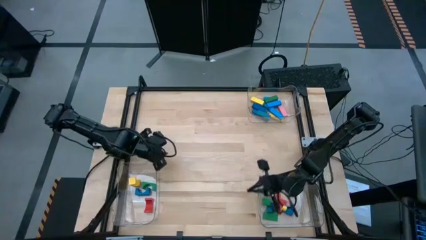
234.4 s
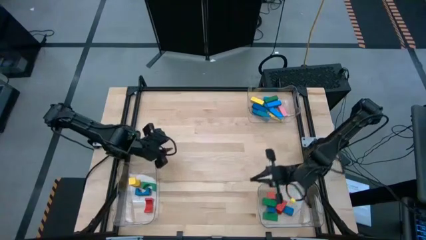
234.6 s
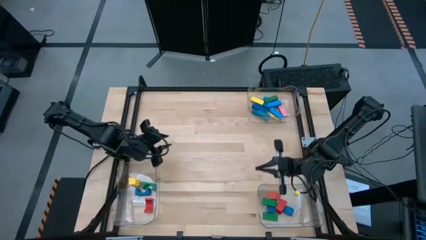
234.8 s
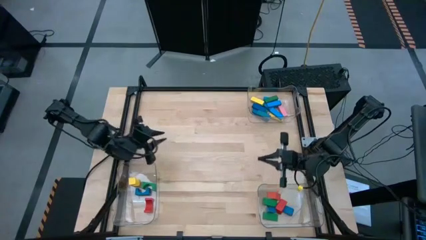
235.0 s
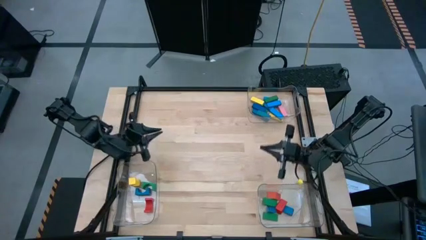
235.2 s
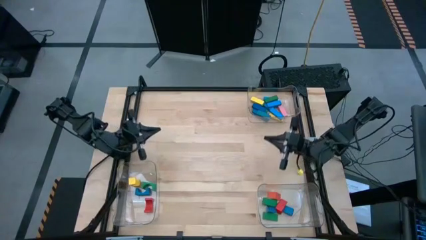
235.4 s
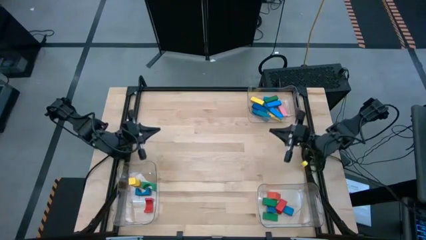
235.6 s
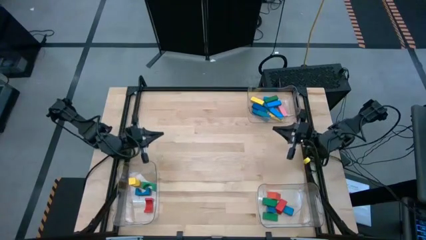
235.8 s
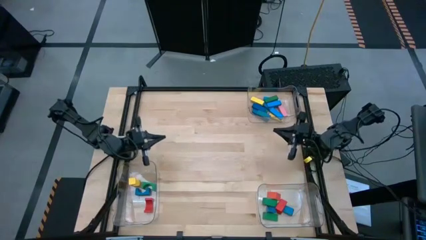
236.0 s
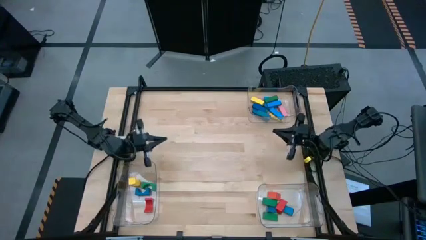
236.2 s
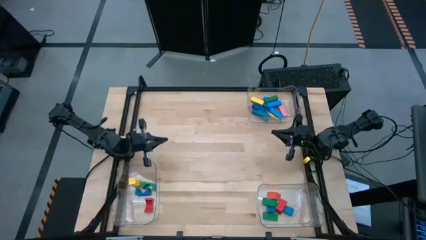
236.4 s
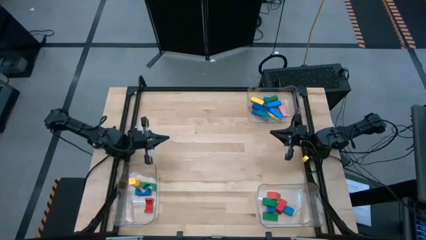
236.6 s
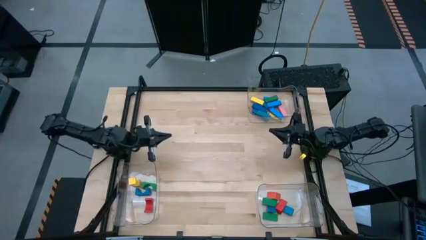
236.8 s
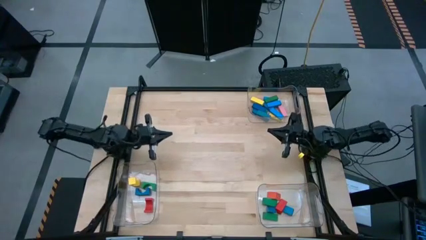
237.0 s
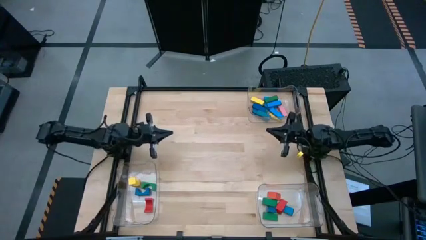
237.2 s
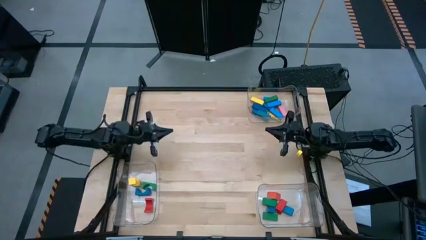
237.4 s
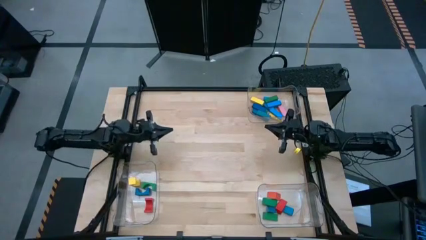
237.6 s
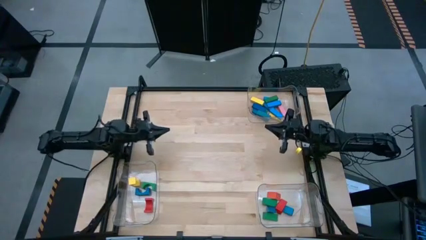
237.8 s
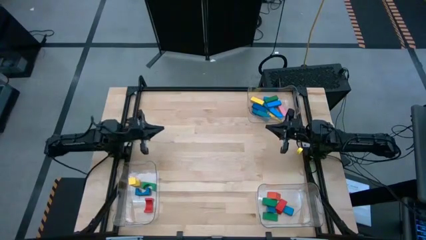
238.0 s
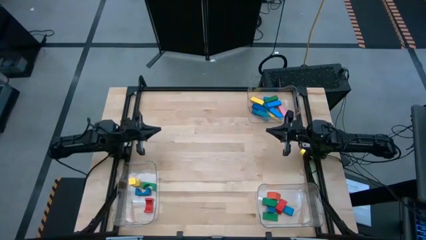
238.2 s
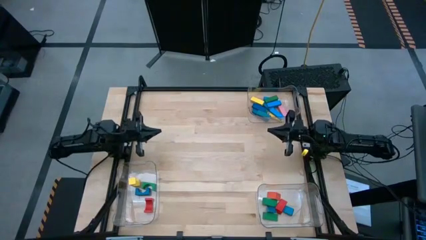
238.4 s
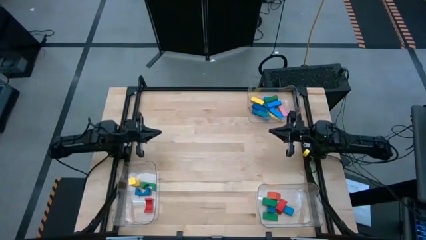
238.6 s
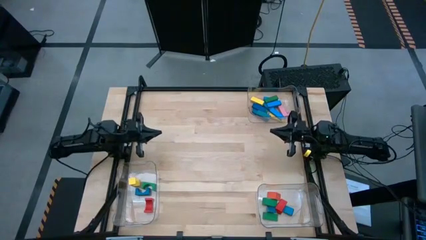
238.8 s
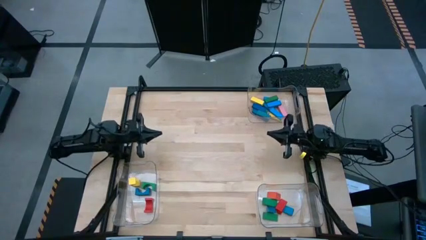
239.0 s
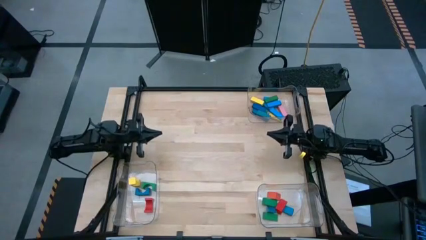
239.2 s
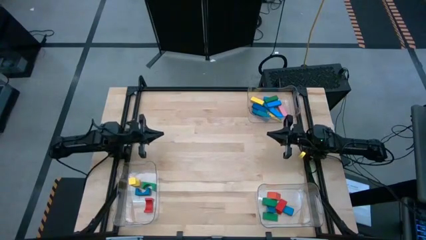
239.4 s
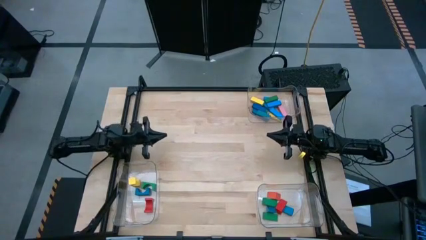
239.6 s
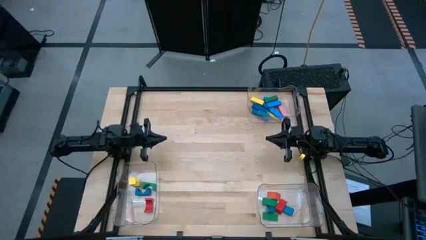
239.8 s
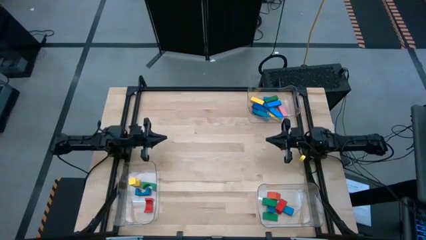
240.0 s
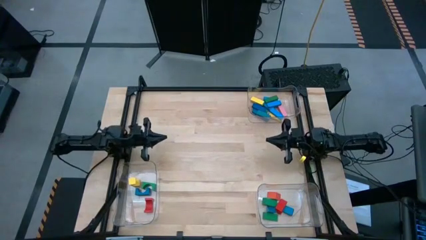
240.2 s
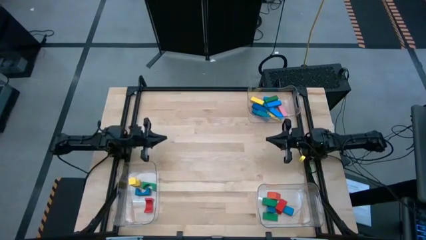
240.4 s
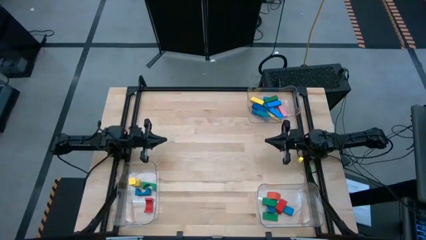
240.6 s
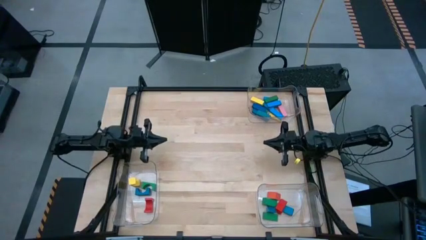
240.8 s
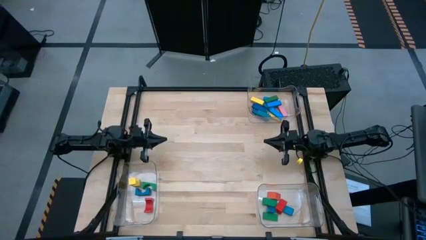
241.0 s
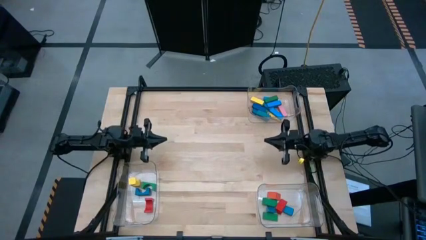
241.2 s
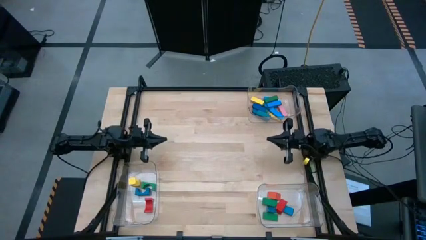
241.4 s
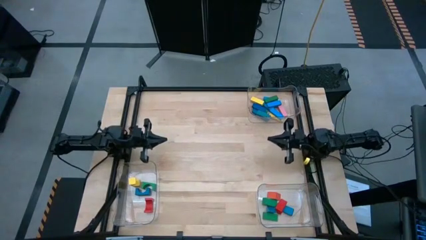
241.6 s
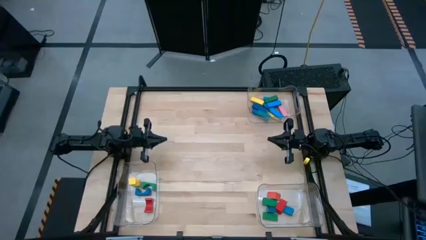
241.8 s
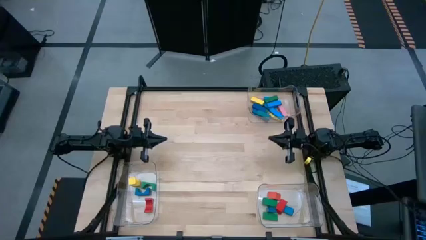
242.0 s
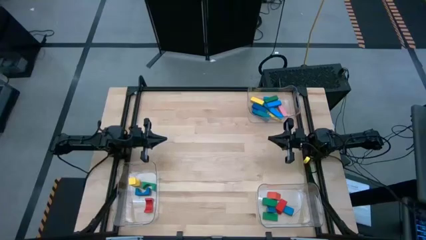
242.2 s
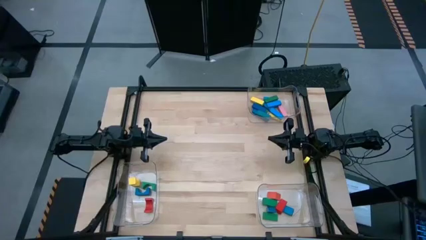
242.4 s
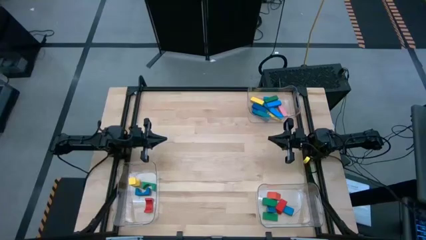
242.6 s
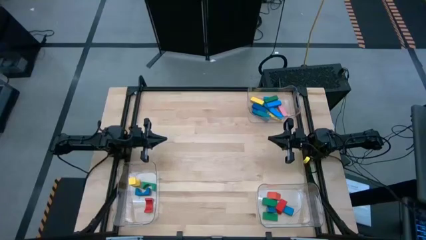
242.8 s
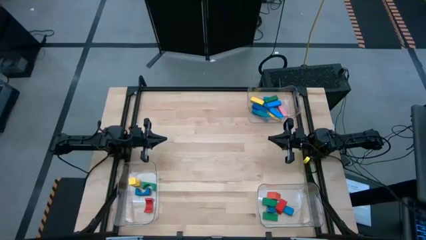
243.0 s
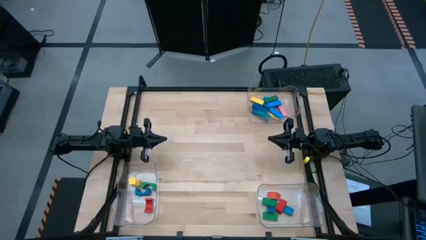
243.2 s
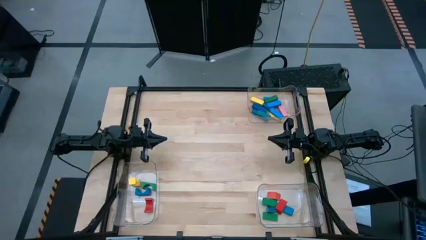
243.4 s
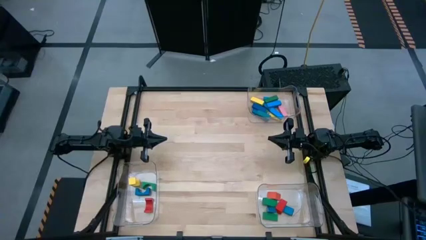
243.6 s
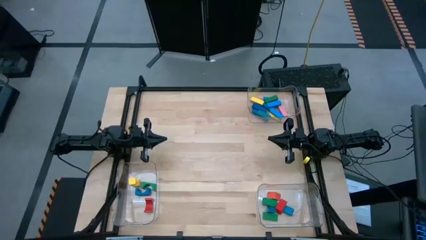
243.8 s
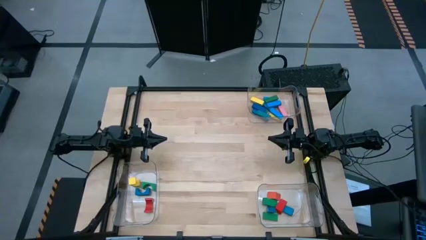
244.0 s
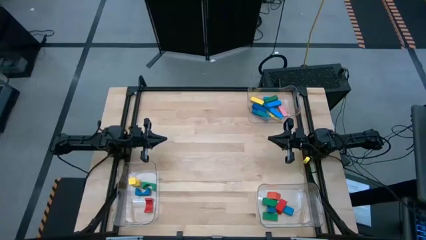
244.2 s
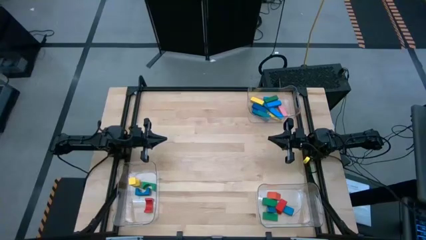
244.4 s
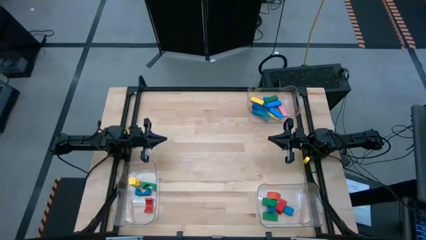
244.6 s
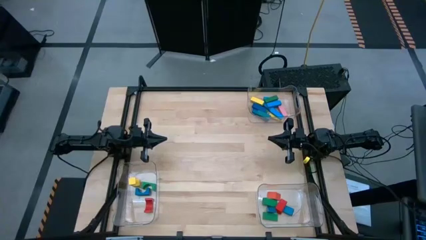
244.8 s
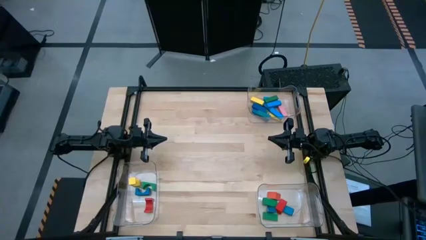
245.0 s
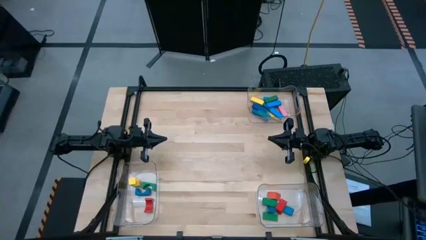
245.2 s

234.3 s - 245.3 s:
Task: Sort blocks by size
Return to Home Position
